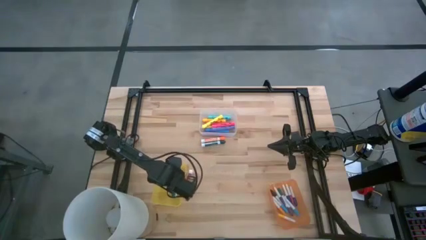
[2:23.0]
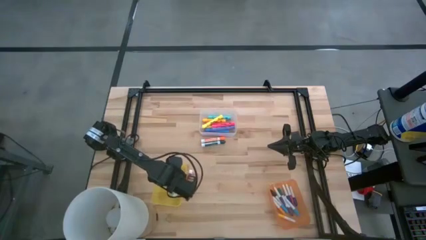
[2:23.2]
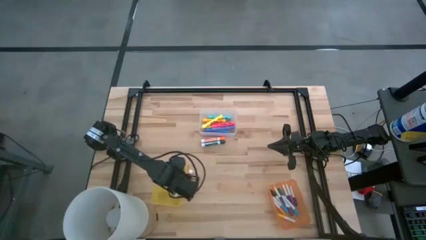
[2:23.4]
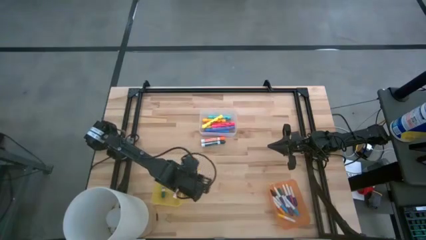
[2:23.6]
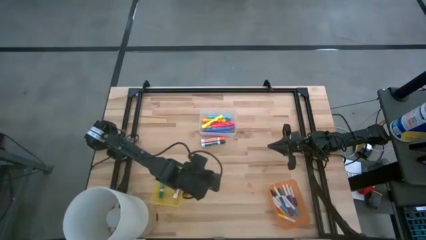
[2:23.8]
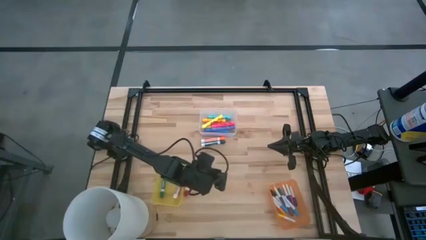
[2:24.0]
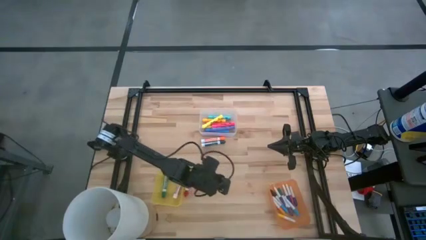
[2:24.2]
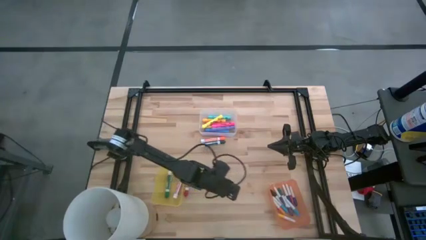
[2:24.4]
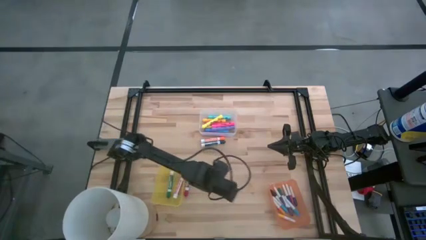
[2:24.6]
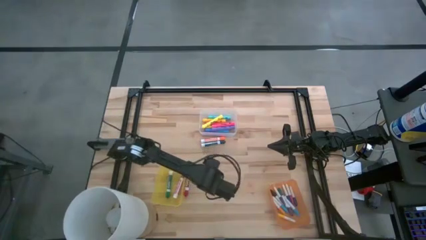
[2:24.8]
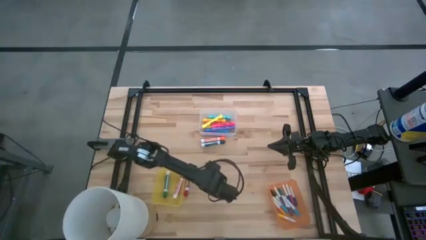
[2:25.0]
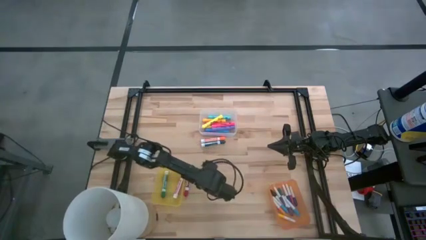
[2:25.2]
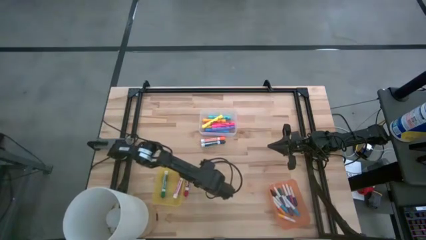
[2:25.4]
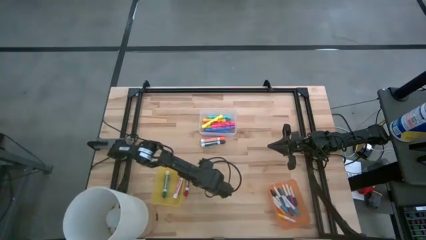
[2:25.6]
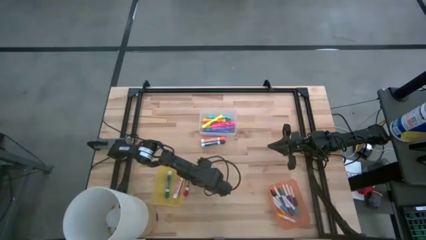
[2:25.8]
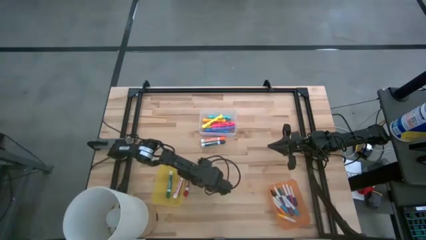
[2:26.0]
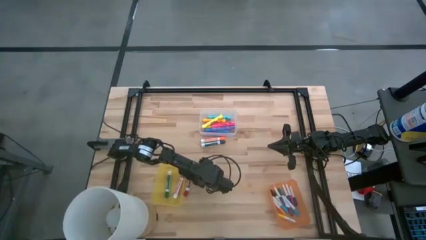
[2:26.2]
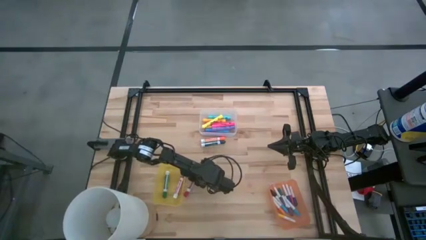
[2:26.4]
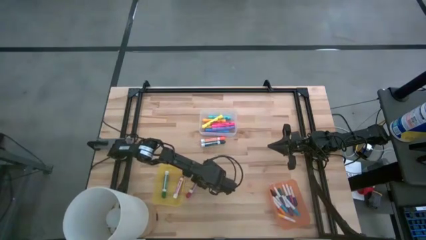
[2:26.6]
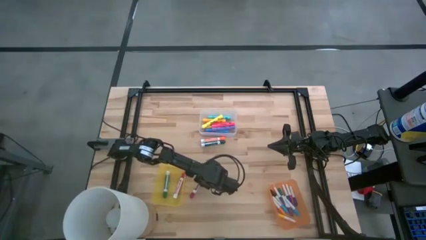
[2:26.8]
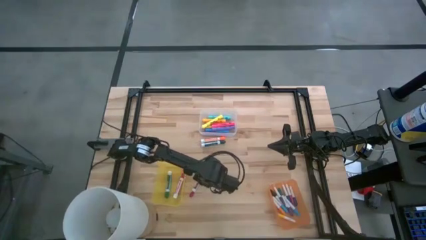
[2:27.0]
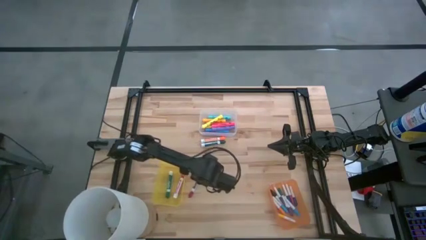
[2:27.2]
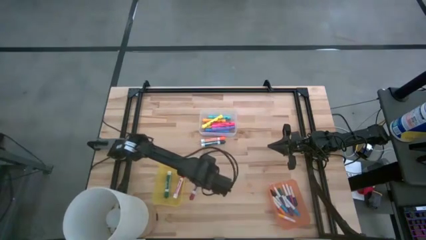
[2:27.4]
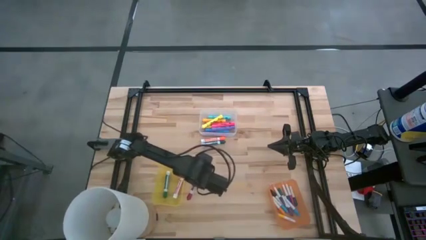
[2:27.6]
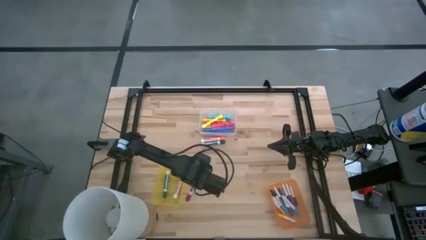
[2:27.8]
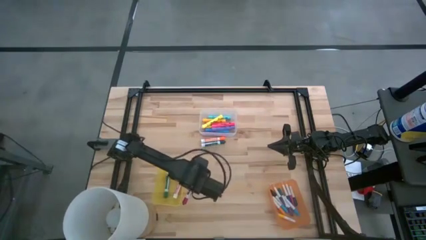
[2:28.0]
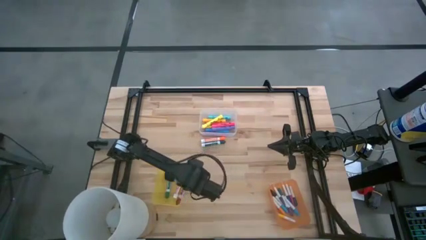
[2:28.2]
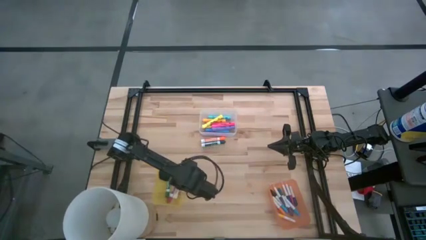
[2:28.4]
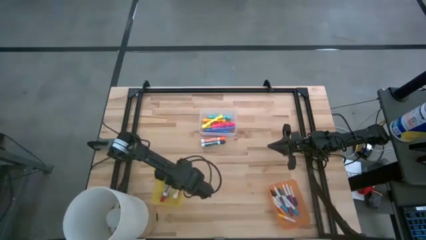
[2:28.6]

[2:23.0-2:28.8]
Task: Pick & Place Markers
Put the red marker pen into the yellow bin

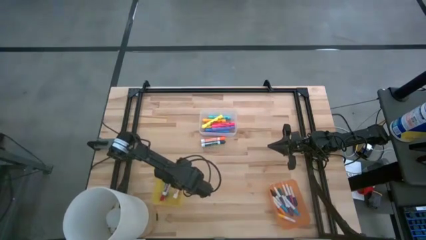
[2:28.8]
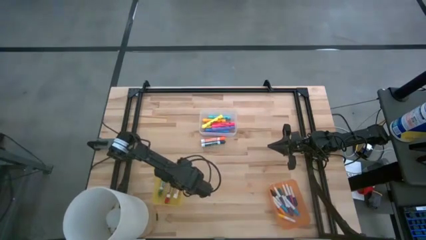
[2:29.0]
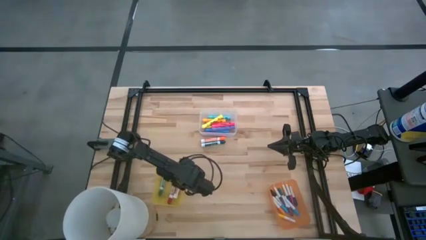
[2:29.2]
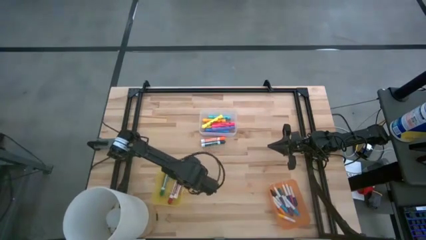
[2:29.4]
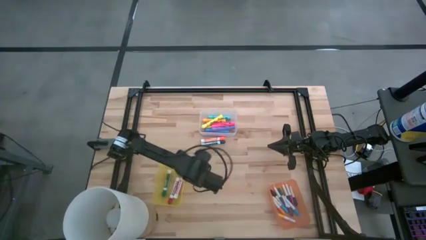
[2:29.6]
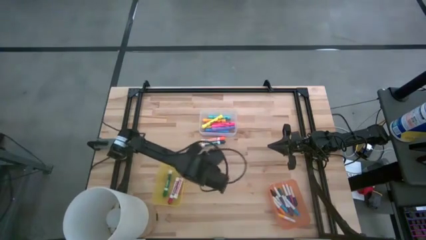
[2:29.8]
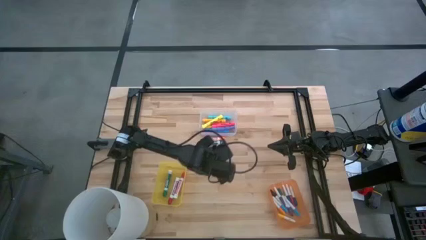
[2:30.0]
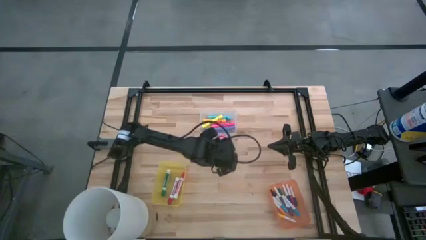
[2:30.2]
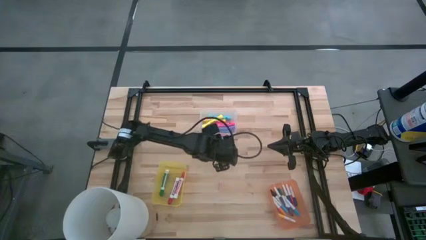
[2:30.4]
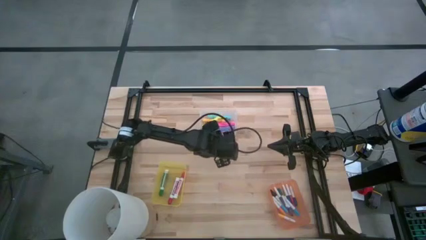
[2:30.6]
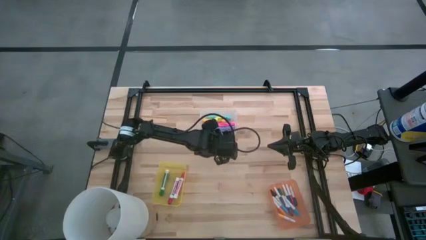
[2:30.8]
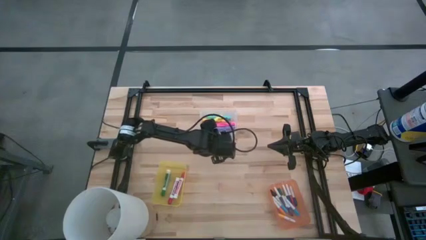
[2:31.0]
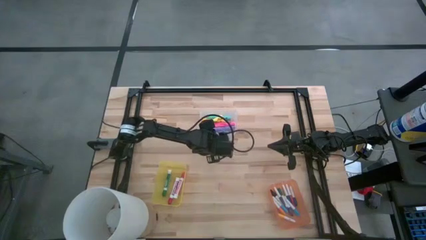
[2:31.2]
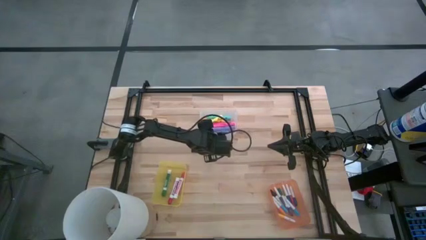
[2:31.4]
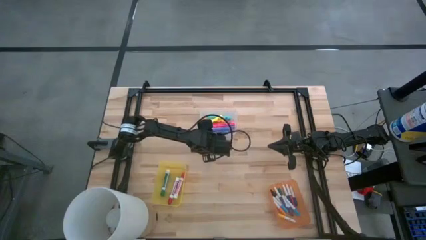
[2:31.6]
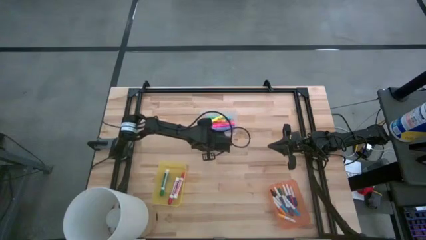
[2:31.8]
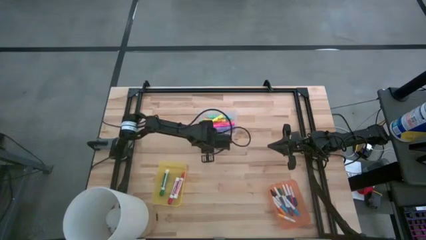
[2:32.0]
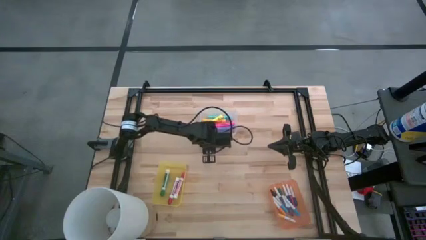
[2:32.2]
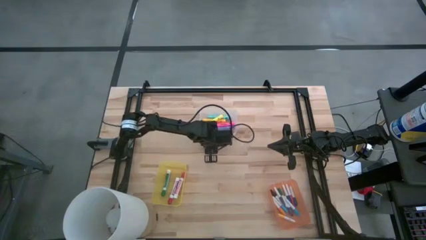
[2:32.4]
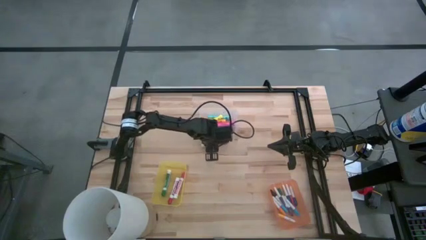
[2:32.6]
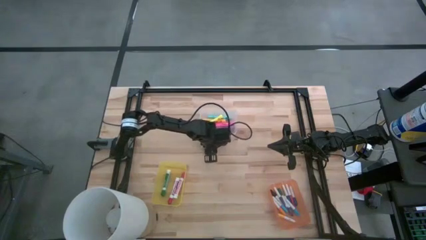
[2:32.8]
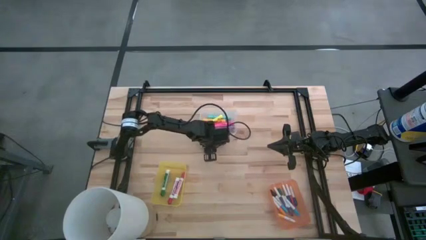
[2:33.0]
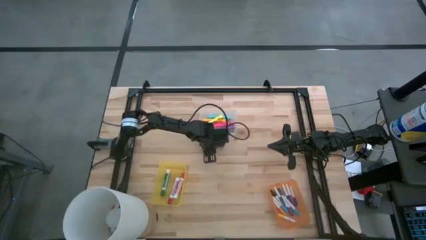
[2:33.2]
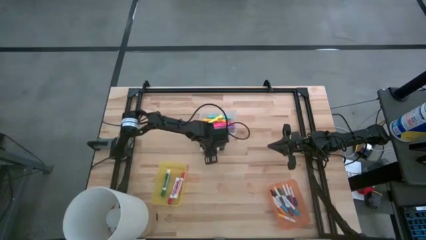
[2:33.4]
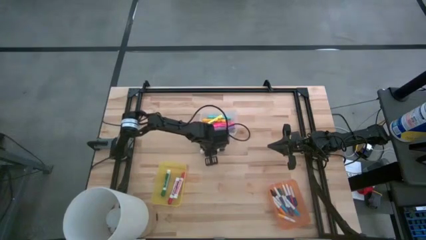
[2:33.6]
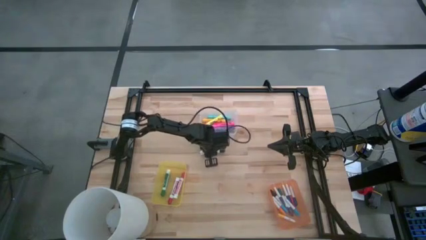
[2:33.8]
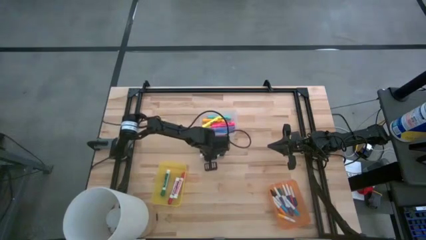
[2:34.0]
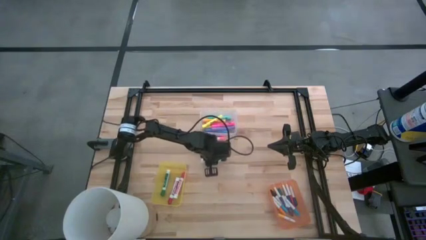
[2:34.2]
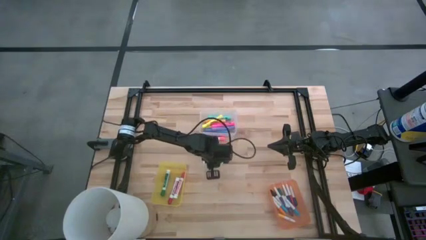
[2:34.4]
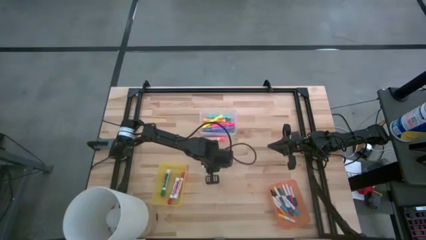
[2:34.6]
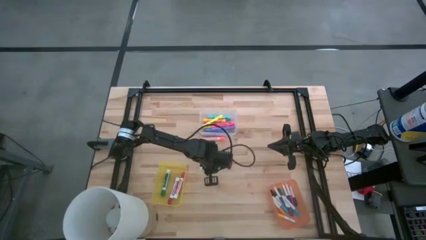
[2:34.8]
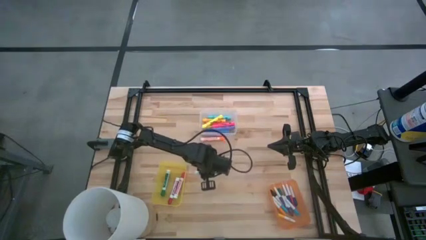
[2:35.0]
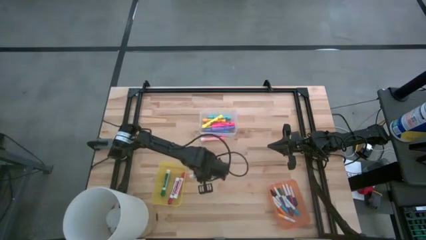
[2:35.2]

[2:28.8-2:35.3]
Put the dark green marker pen into the yellow bin

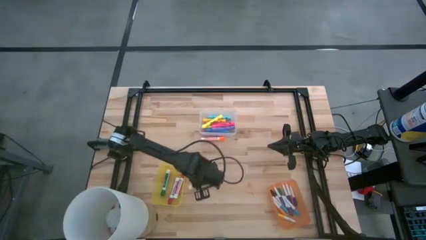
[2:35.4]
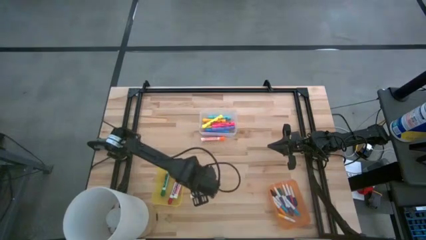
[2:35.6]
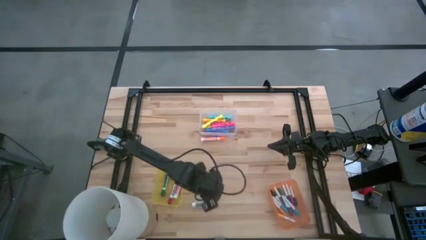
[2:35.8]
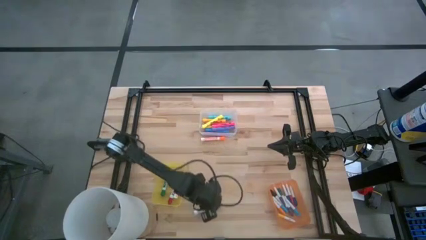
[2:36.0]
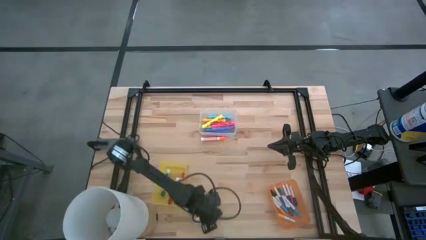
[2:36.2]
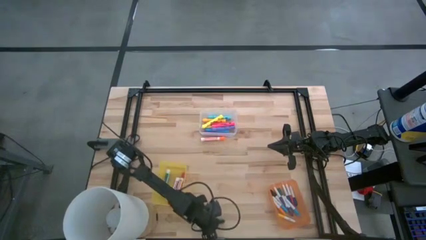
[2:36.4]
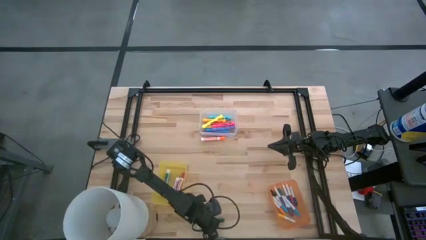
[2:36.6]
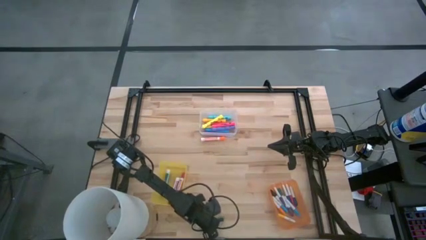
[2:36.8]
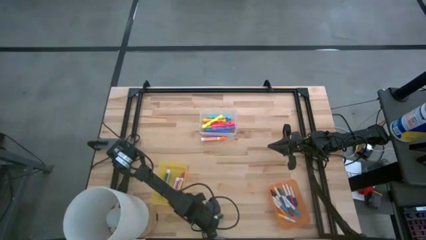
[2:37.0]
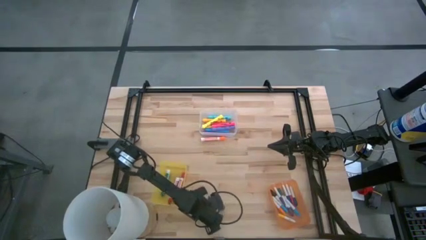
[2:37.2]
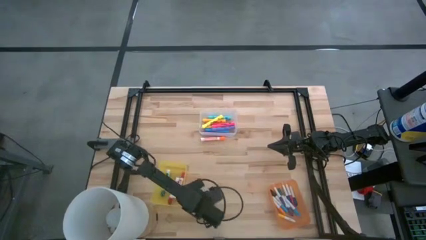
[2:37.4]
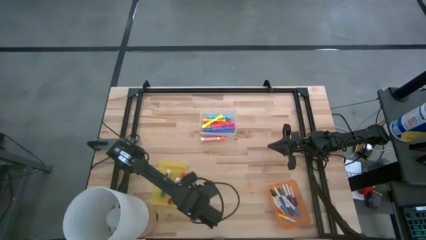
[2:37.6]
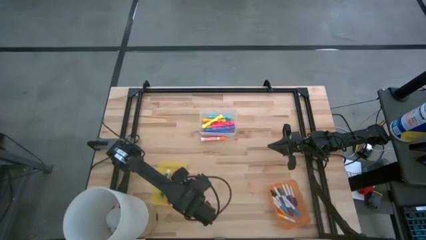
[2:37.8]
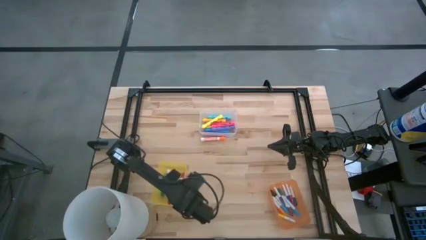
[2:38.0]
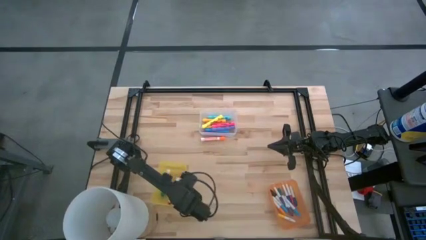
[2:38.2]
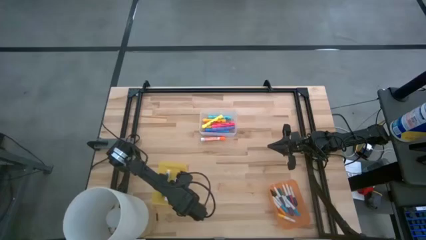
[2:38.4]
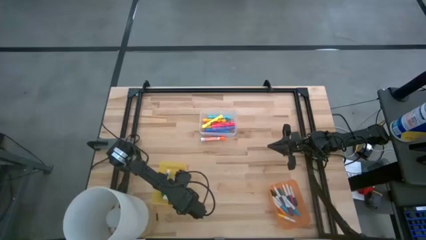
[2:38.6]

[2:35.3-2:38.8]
Put the dark green marker pen into the yellow bin
